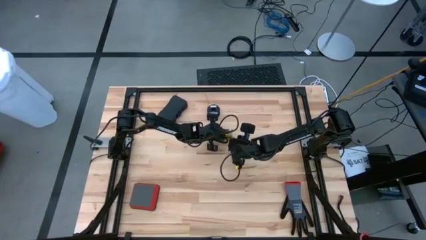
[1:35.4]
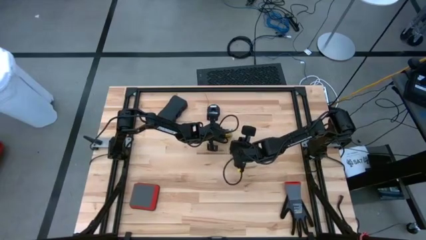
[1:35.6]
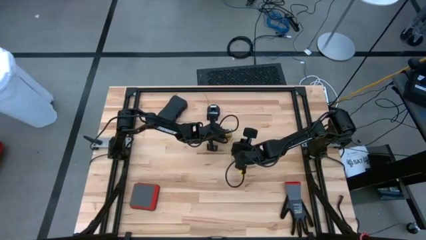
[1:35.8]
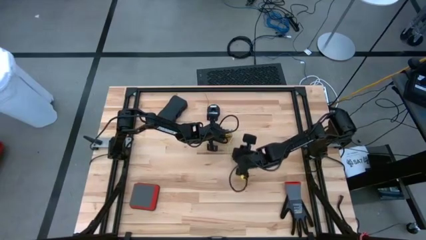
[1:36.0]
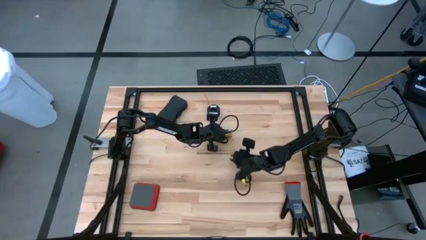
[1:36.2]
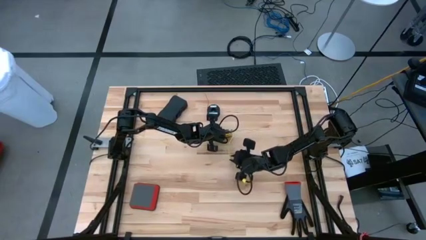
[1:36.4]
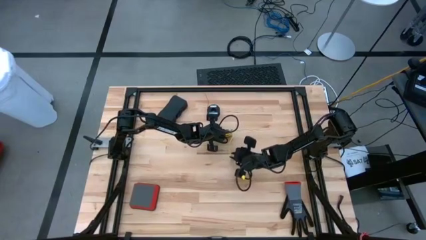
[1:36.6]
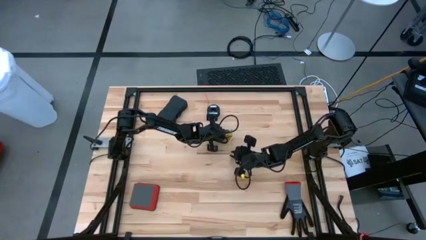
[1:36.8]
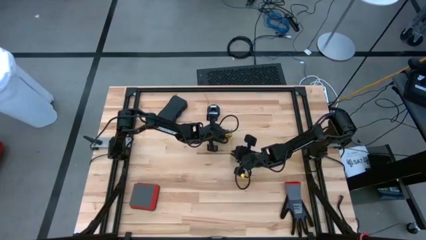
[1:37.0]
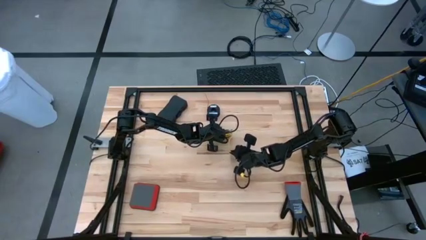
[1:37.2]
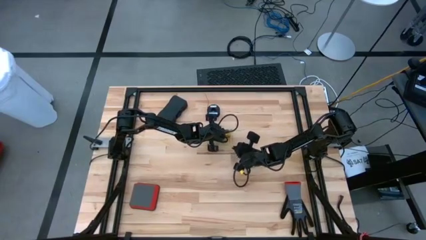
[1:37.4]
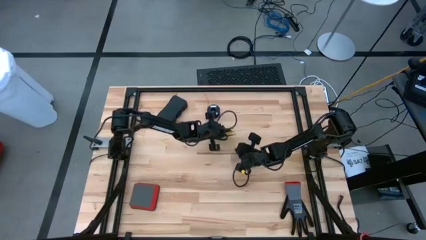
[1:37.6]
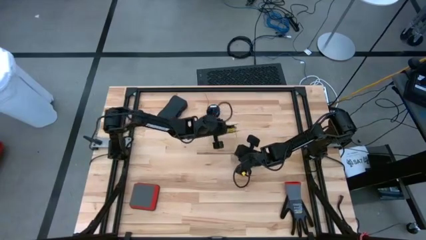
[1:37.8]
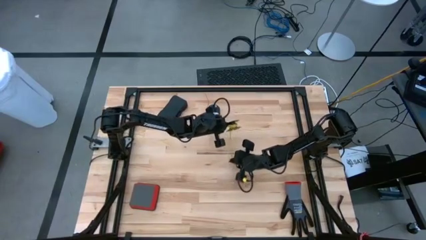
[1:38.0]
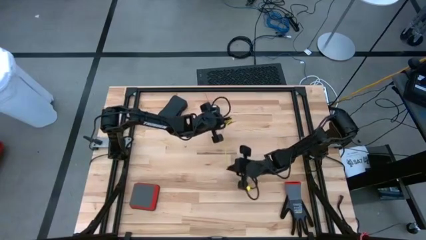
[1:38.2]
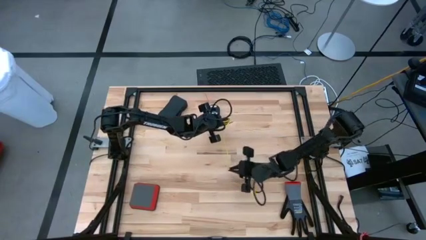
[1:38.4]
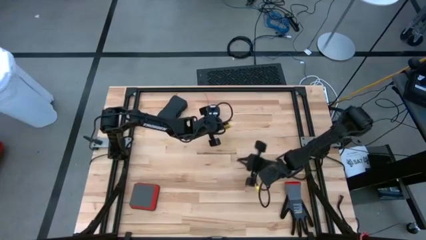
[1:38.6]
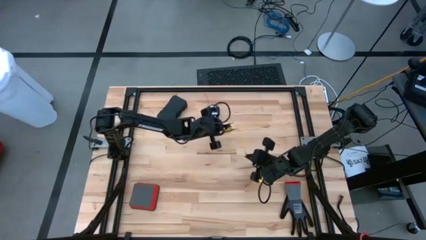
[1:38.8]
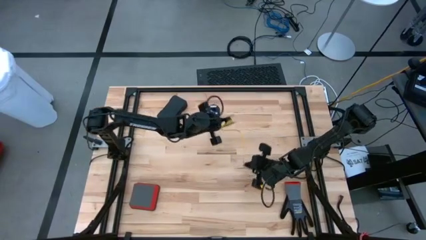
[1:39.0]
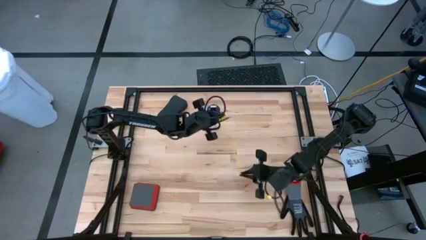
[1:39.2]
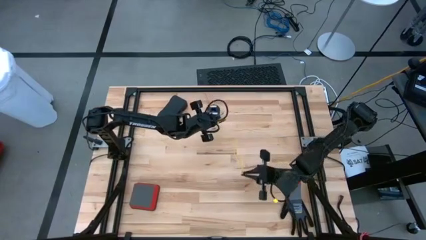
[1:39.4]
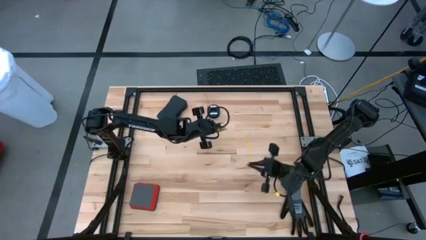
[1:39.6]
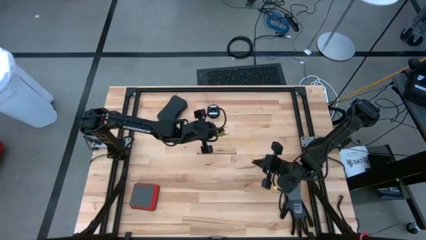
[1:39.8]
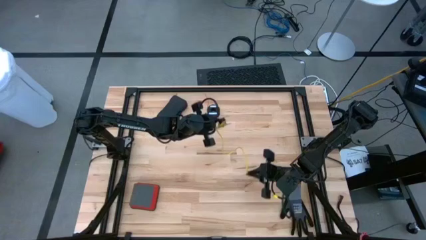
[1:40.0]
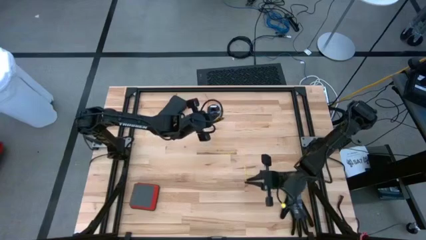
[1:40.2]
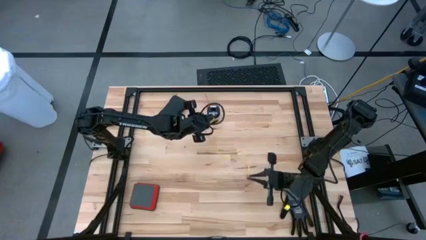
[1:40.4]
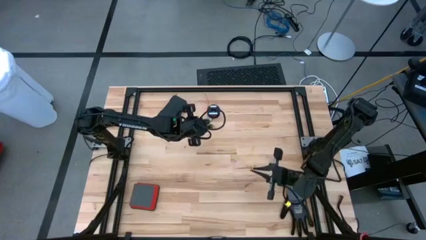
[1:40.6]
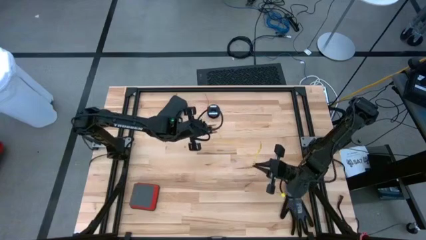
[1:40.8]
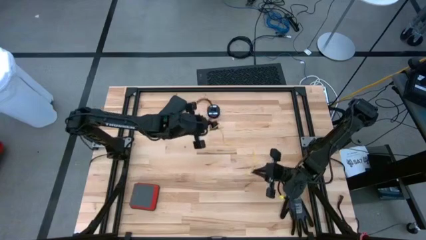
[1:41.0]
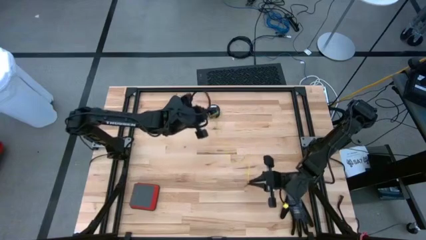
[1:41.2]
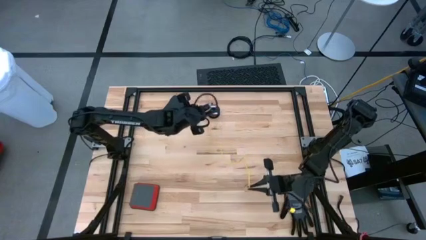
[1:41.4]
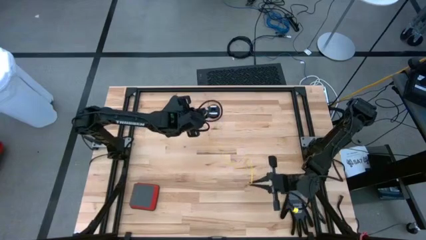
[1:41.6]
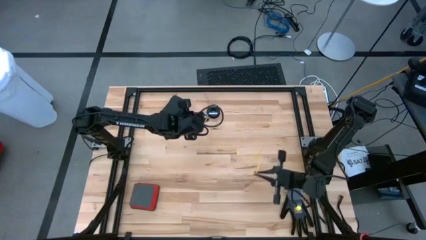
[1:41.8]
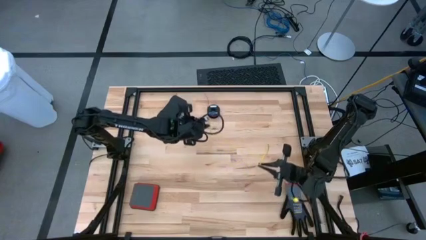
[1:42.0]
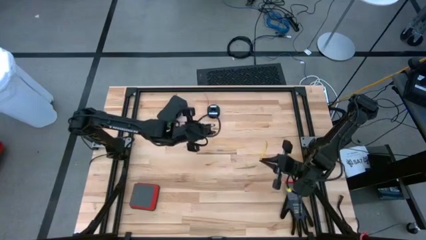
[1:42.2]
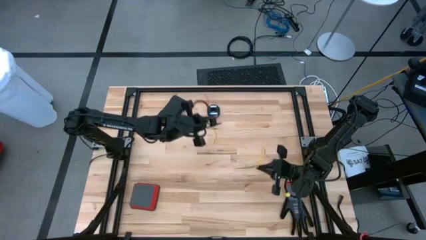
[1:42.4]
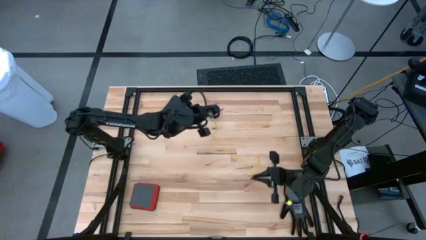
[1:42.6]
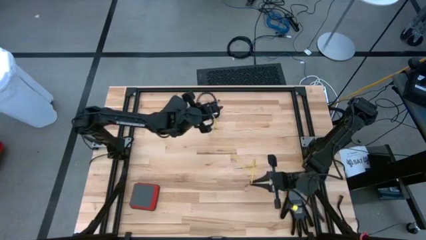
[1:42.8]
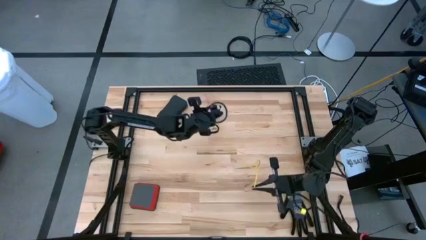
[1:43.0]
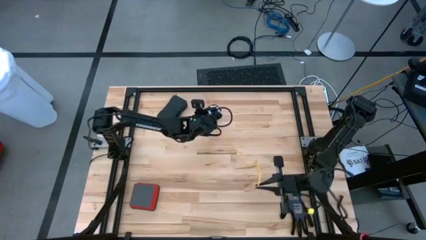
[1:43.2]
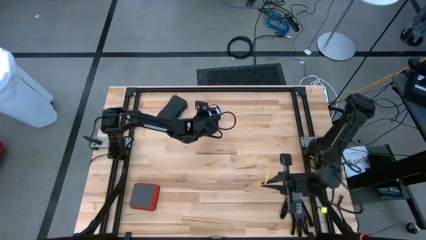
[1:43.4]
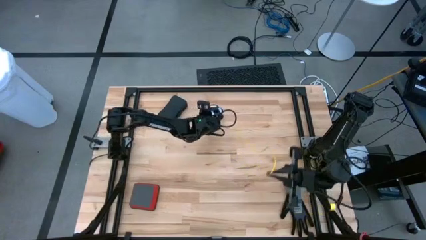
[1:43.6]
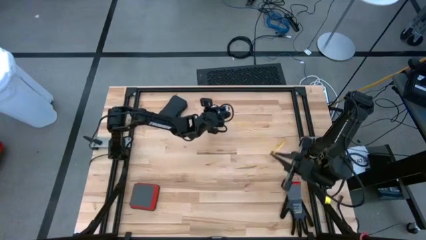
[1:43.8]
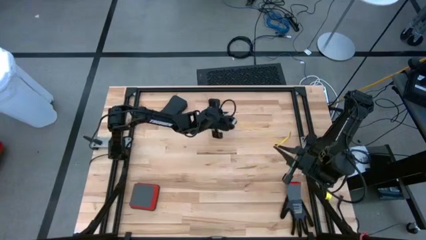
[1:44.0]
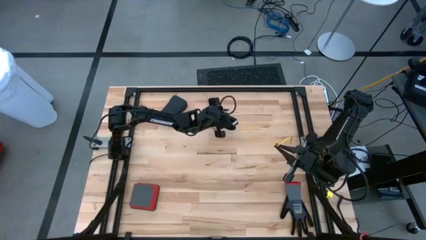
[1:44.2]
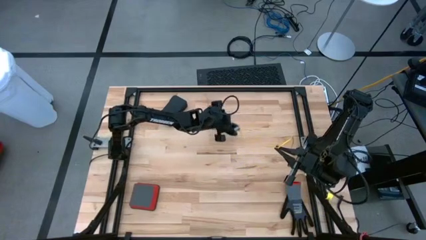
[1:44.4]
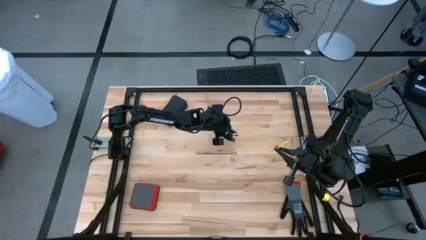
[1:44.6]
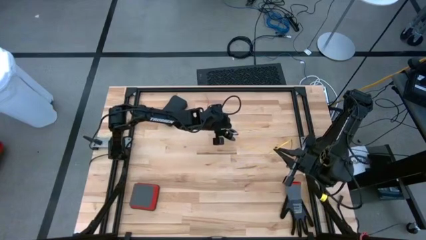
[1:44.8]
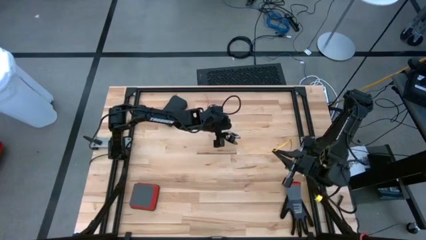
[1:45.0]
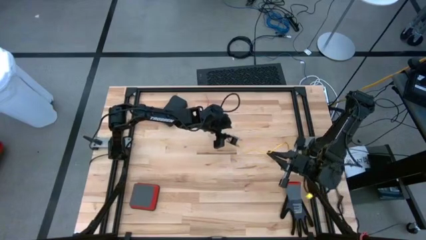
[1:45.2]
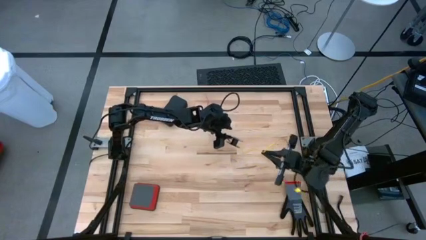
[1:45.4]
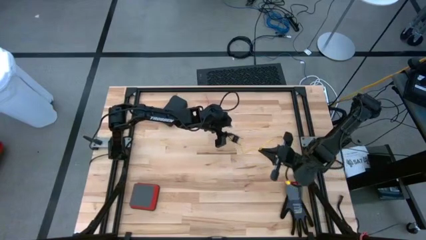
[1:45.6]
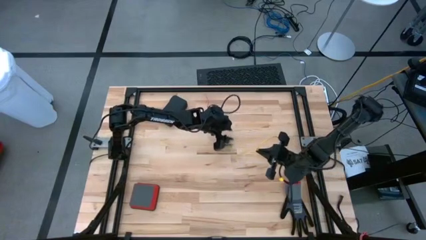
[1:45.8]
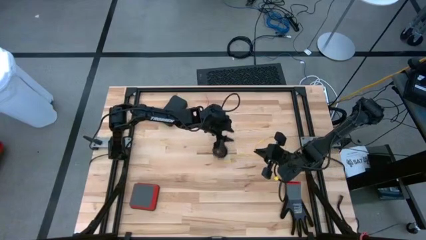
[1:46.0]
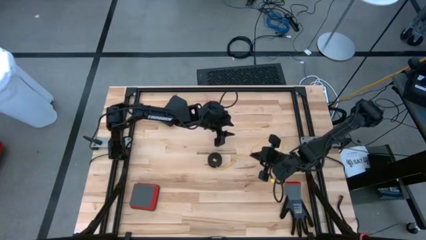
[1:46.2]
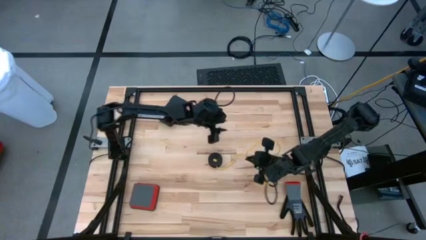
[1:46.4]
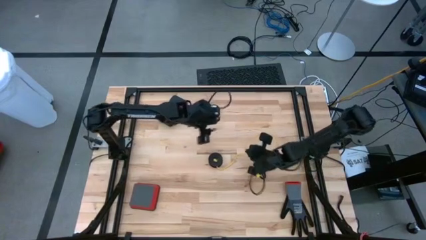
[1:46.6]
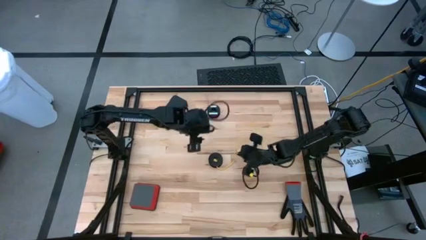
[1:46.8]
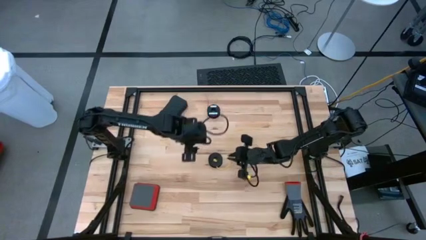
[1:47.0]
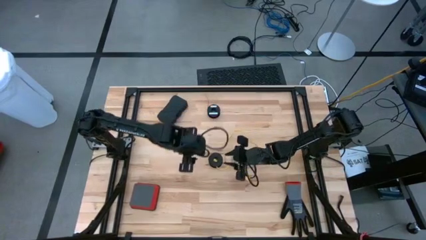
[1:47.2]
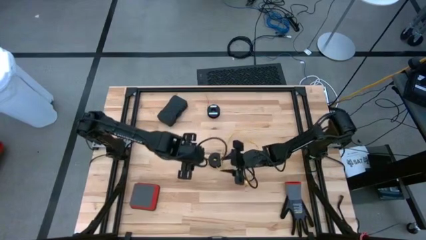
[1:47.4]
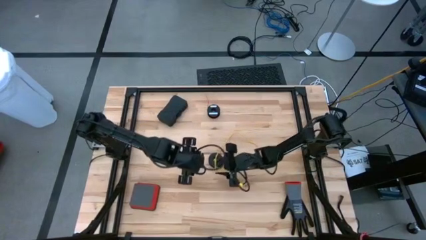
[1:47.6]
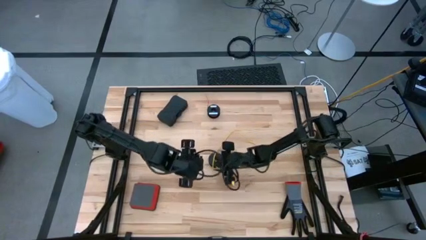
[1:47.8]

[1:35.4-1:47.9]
Task: Coil cords
Uncoil the yellow wire from the black spool

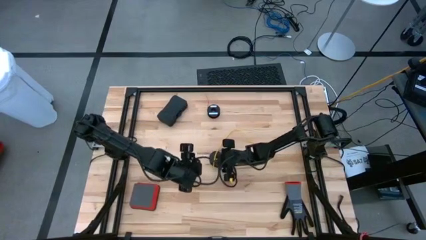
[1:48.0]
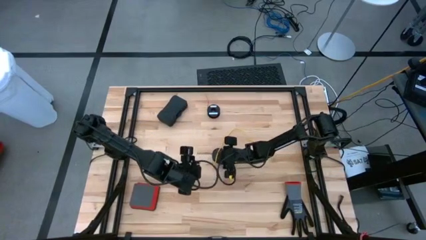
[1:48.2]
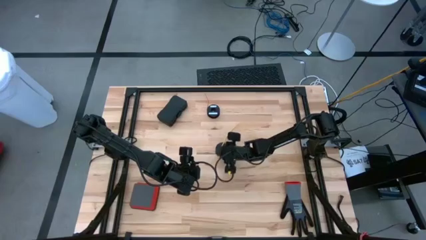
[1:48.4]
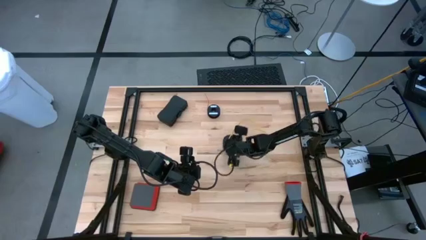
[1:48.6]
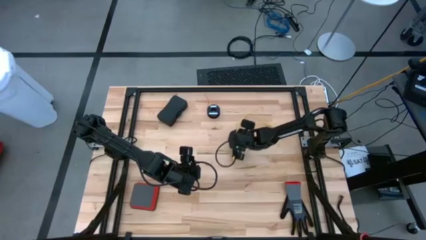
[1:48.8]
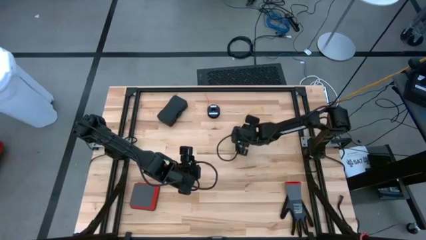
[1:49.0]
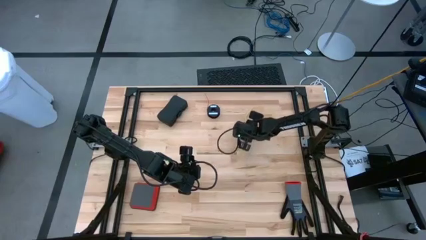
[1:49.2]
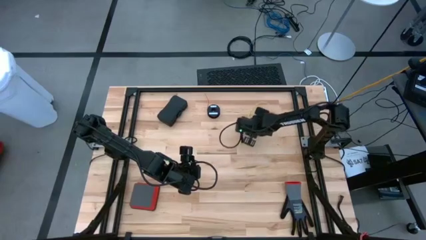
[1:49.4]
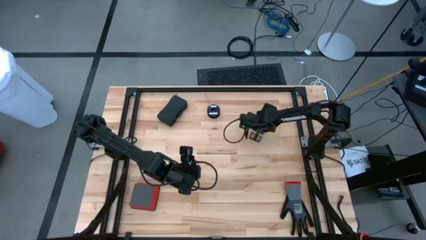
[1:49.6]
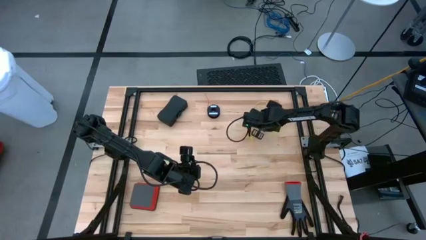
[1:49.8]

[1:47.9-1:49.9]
Move the bottom black spool to the top right of the table
